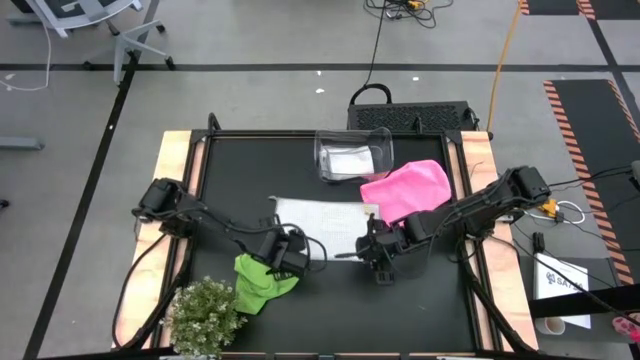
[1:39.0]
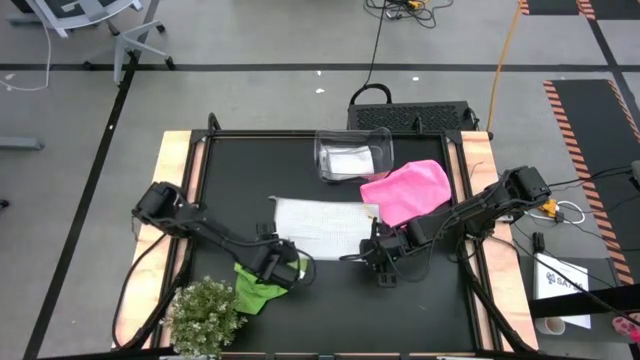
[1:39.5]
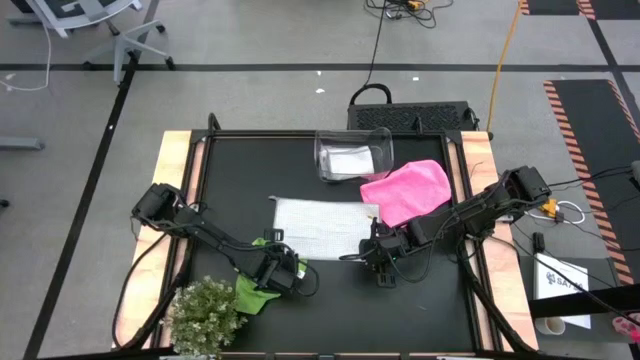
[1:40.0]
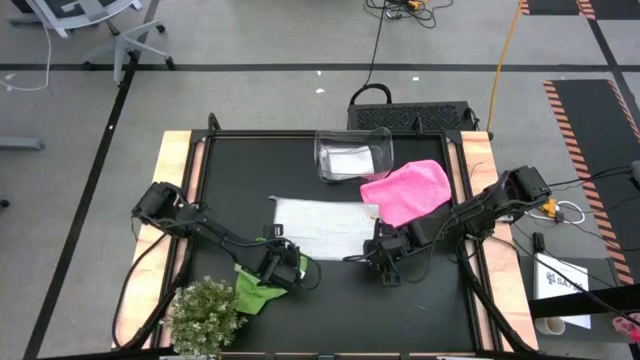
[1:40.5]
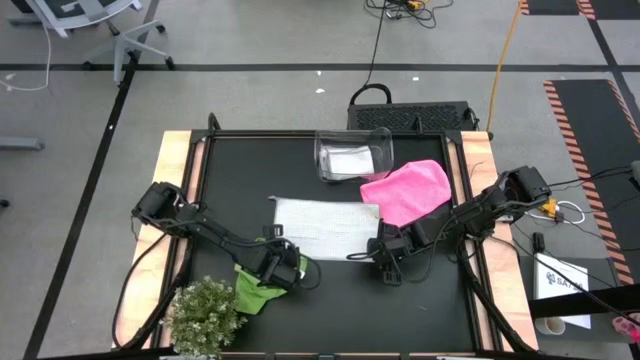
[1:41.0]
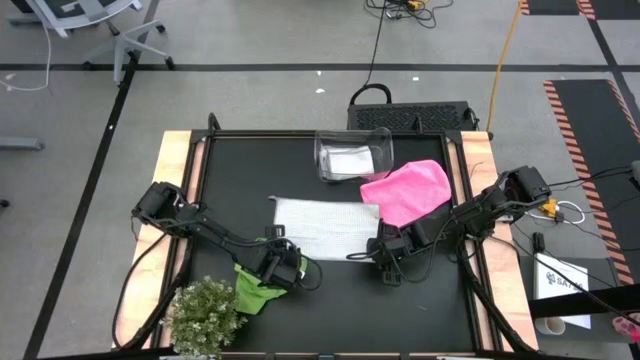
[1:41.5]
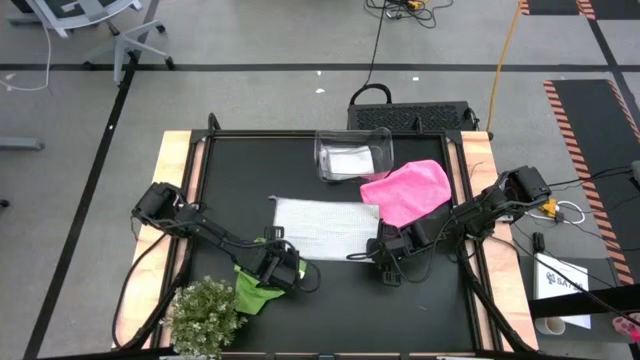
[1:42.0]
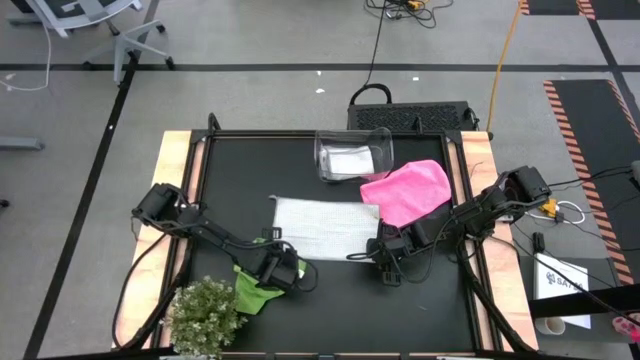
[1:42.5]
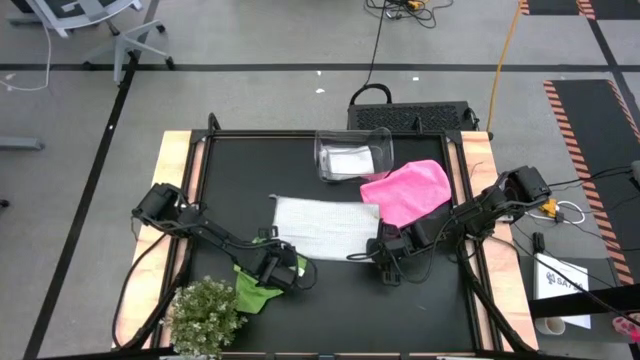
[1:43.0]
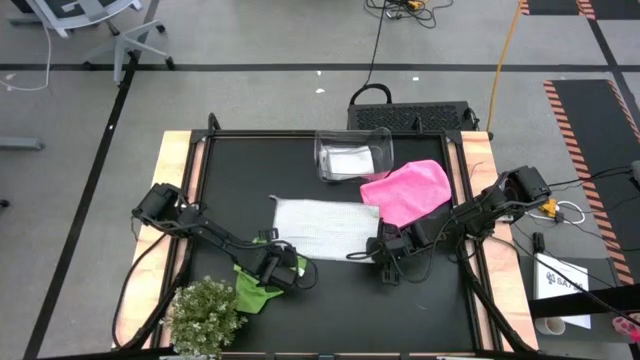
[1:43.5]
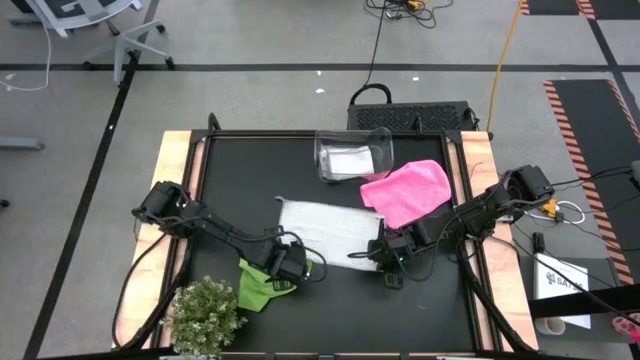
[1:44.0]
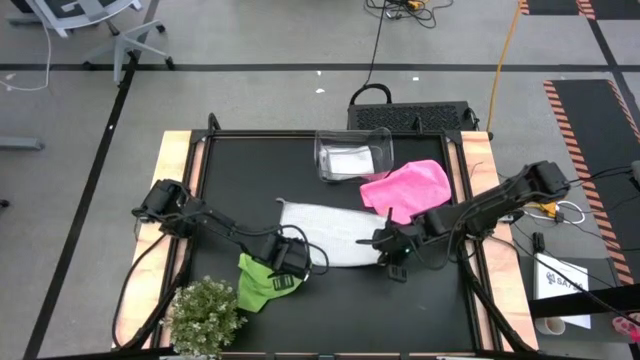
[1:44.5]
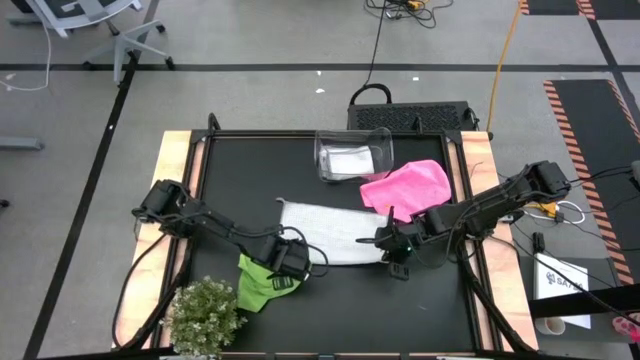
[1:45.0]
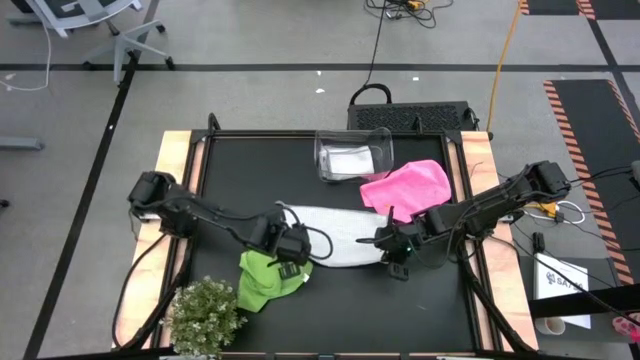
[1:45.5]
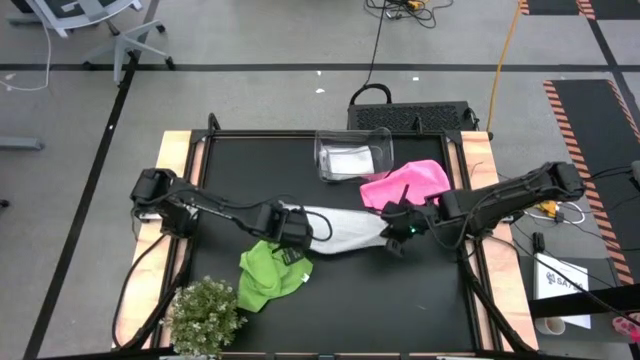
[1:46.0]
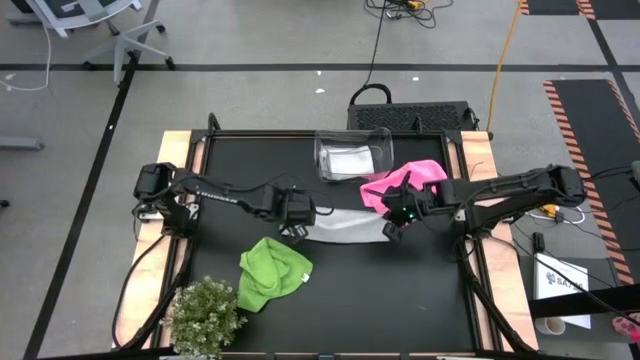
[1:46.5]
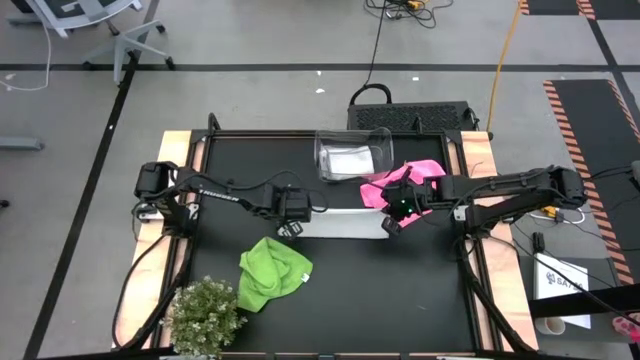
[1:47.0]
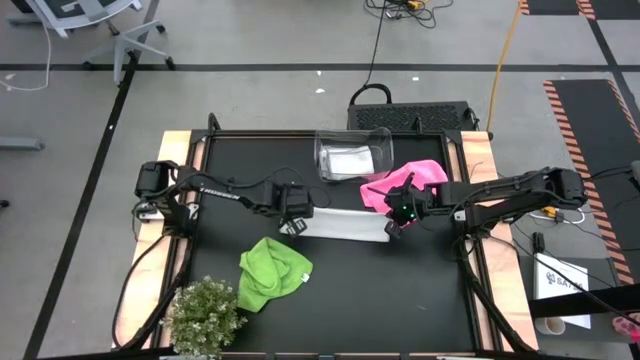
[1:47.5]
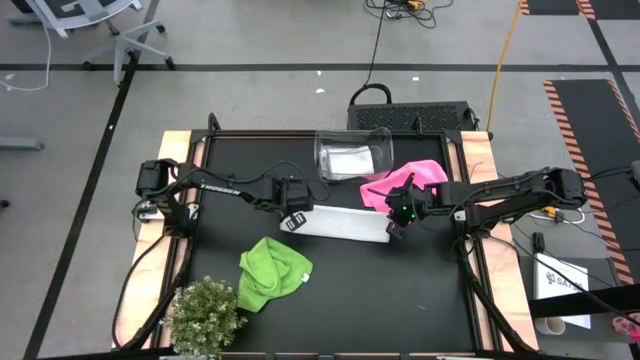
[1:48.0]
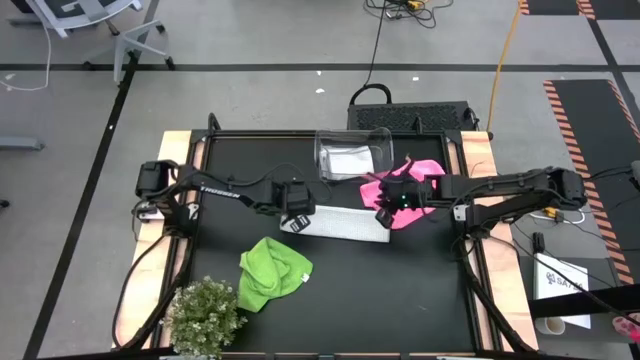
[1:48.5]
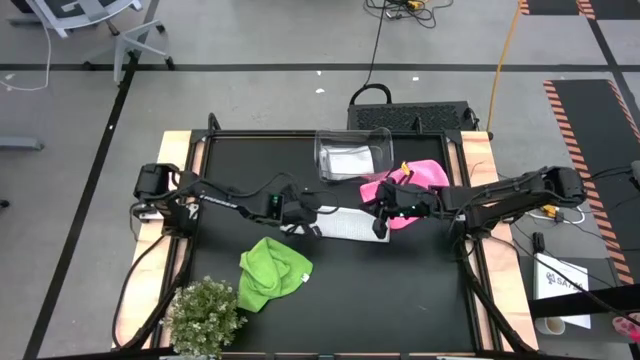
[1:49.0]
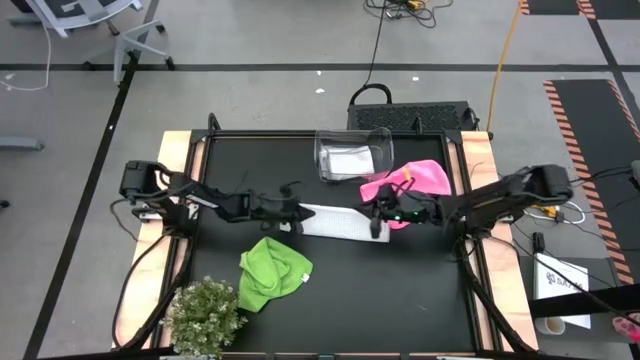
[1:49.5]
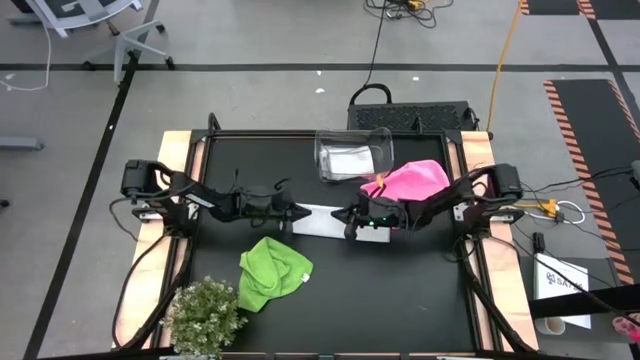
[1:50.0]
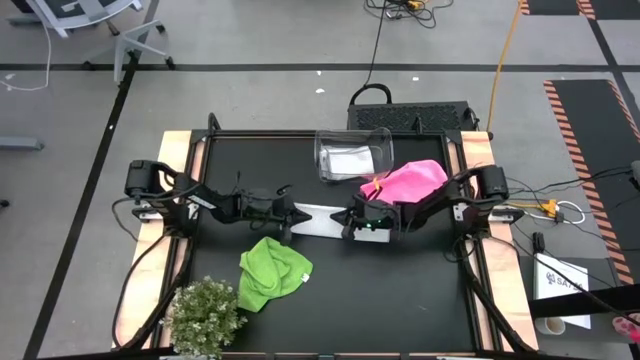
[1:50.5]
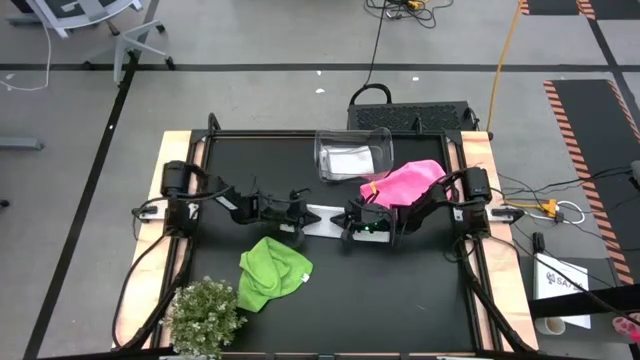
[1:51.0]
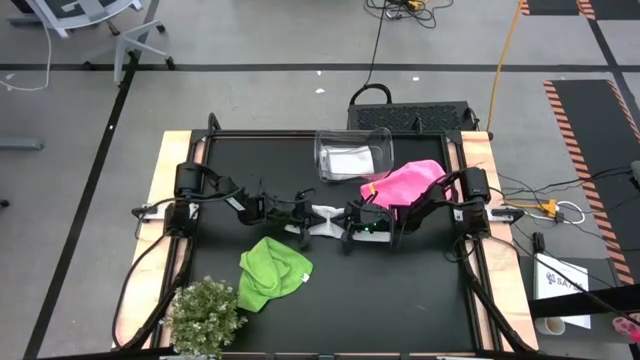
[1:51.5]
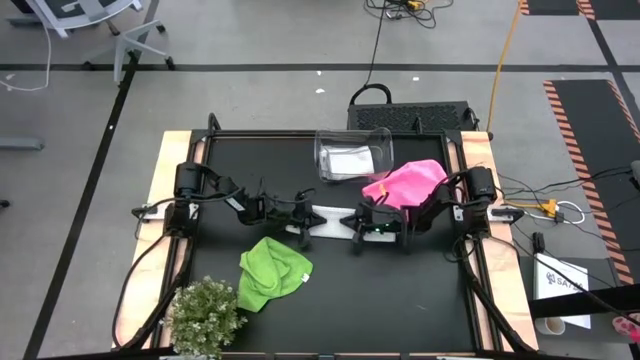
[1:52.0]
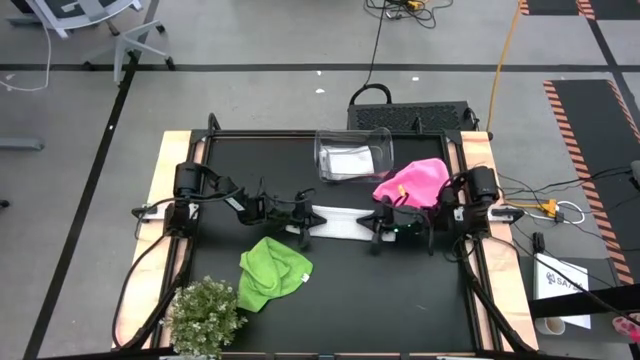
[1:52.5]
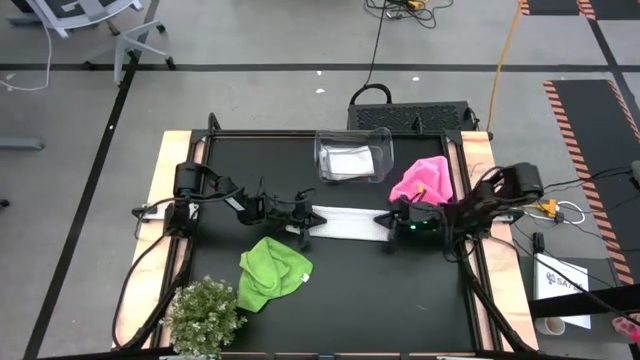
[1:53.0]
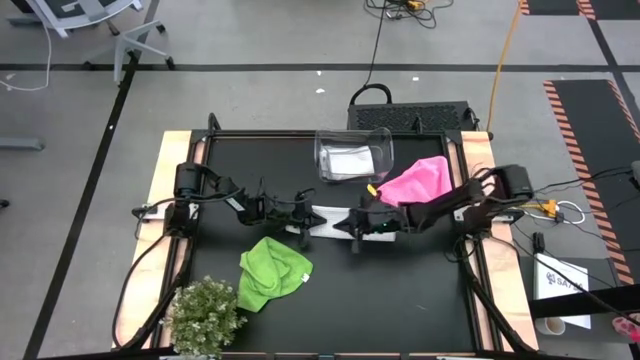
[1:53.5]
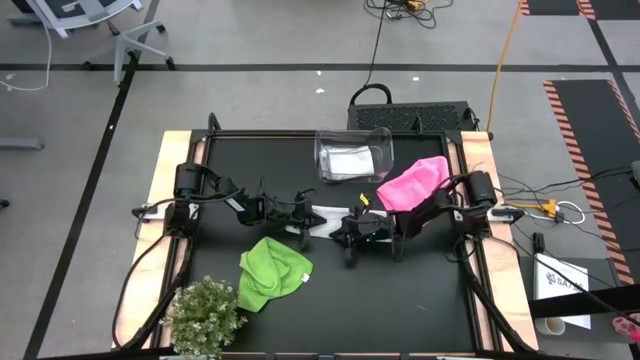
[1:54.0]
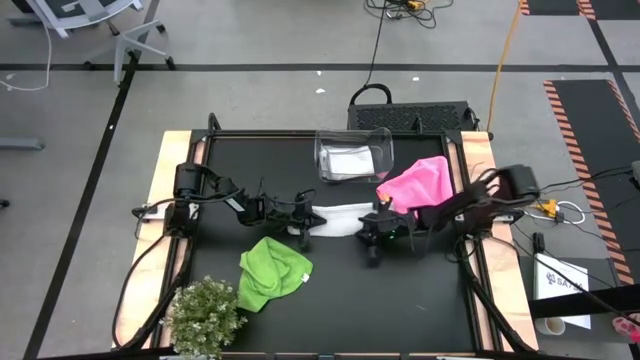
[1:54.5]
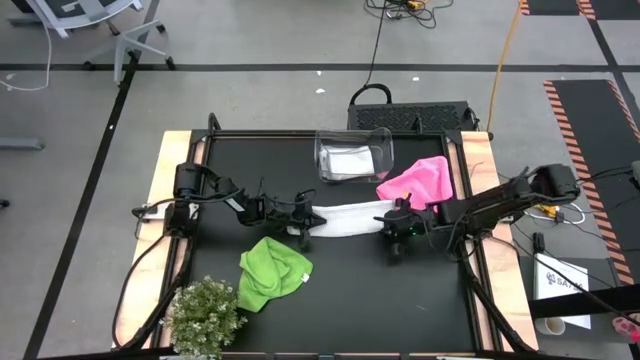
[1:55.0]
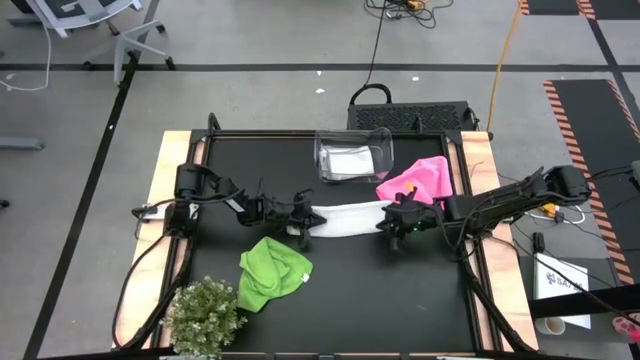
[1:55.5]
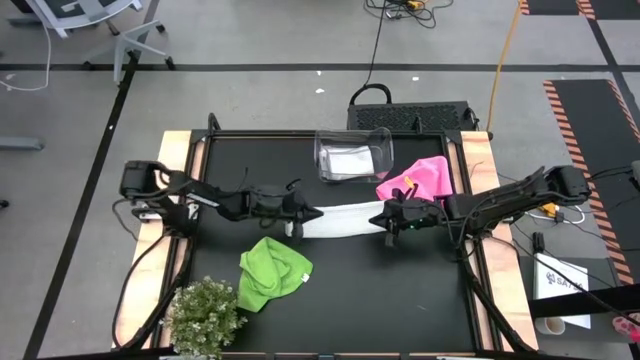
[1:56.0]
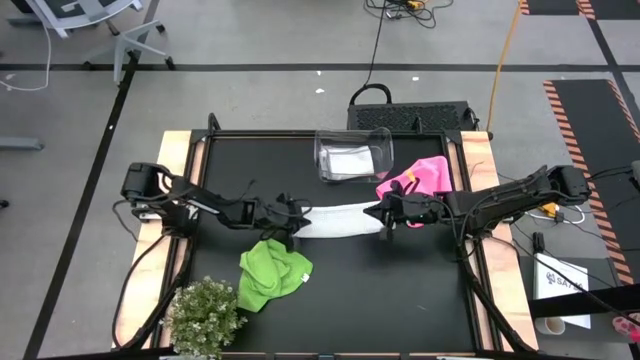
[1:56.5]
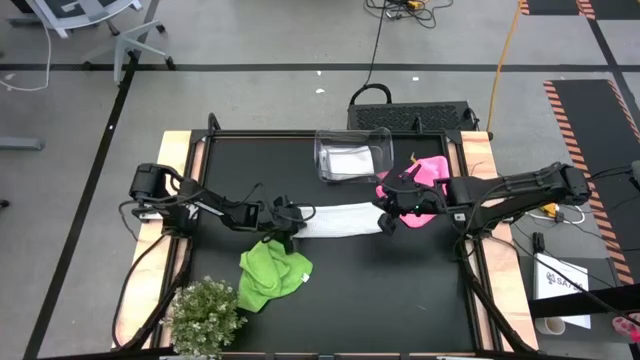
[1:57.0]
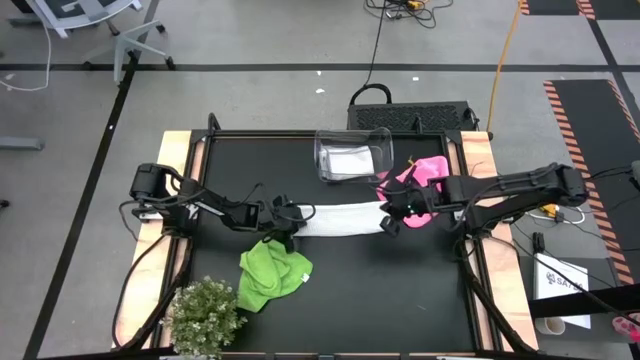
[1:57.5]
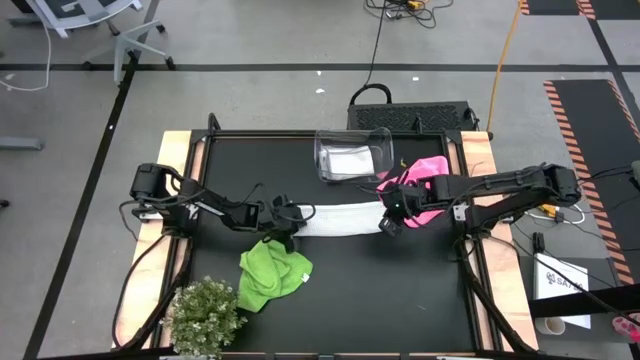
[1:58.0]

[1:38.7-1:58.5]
Task: Fold microfiber towels
Fold the gray microfiber cloth

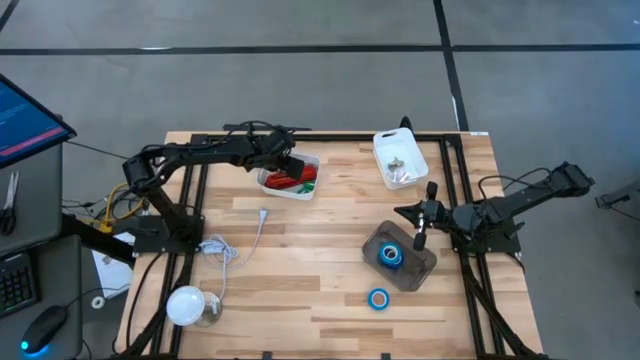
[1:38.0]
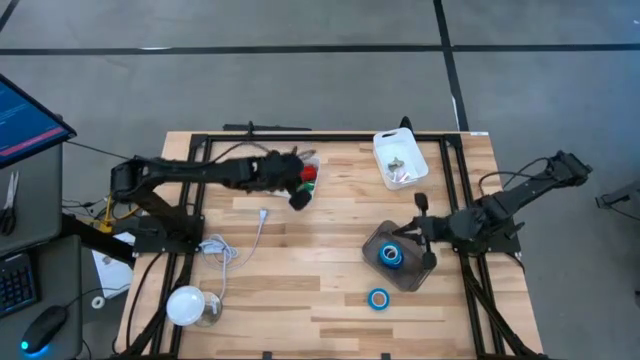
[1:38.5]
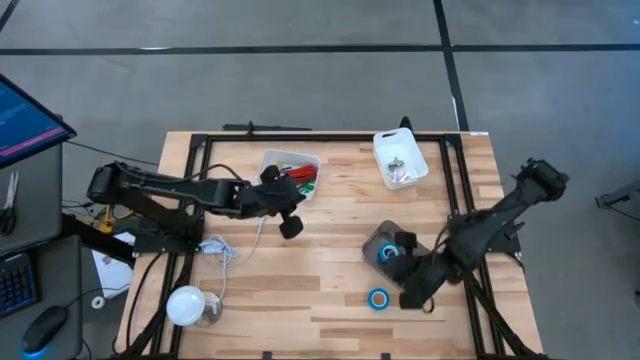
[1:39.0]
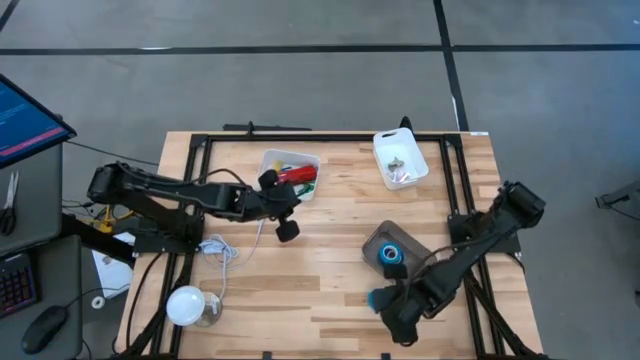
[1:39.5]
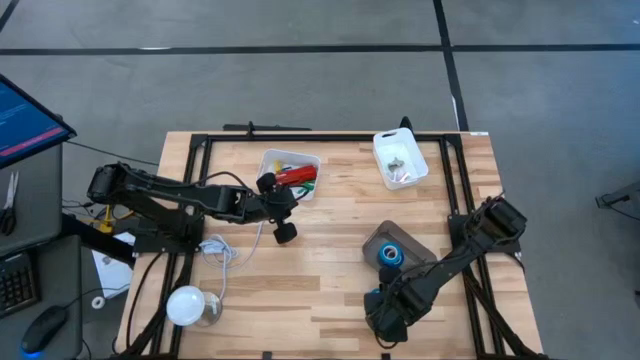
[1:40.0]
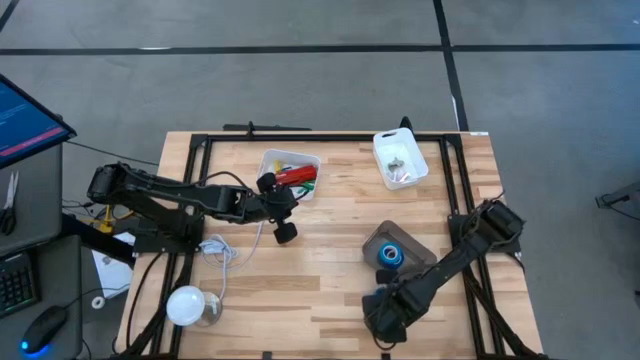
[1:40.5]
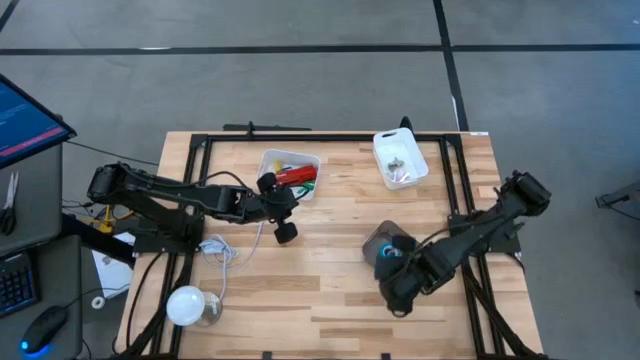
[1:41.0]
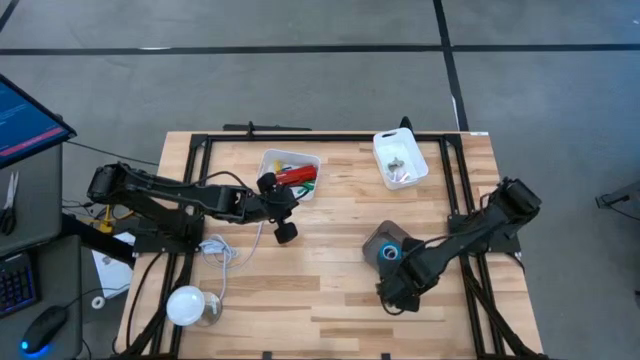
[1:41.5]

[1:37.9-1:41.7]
Task: Pick and place Stapler, Stapler remover, tape
Put the light blue tape into the black bin
